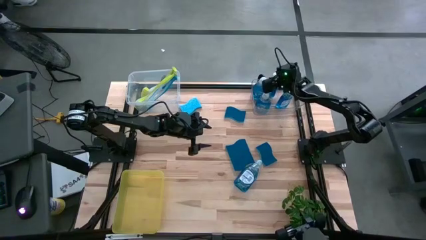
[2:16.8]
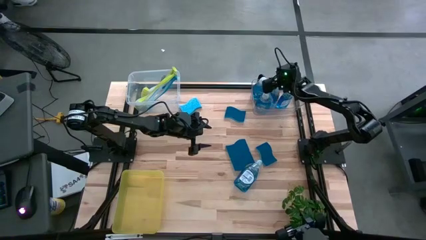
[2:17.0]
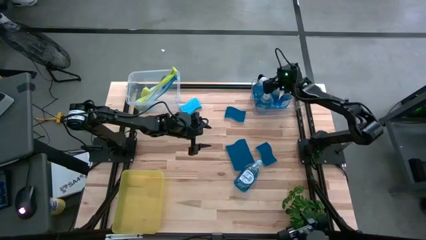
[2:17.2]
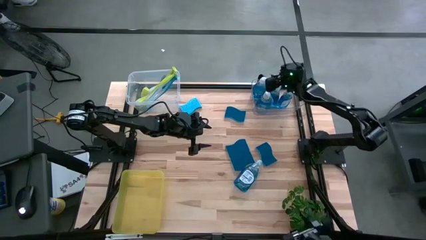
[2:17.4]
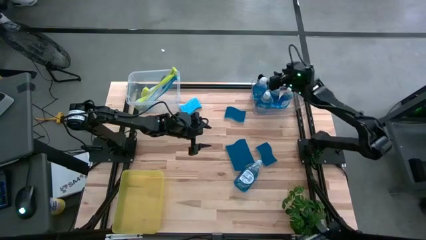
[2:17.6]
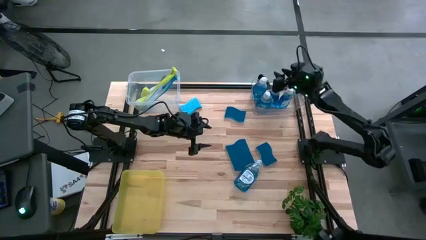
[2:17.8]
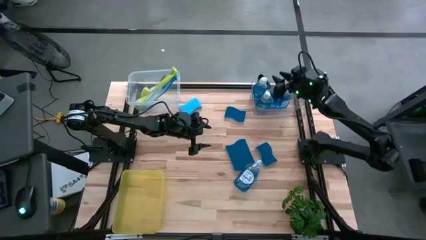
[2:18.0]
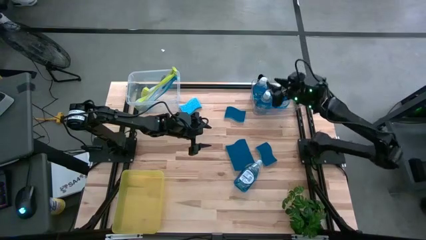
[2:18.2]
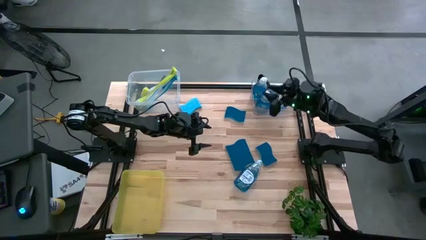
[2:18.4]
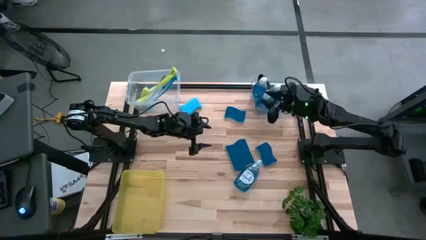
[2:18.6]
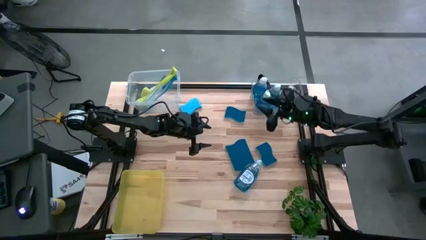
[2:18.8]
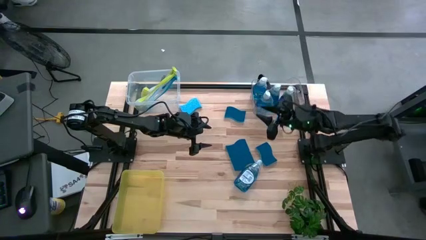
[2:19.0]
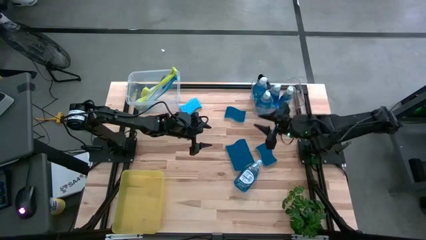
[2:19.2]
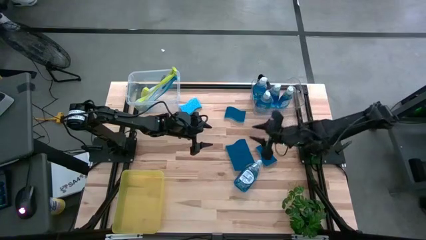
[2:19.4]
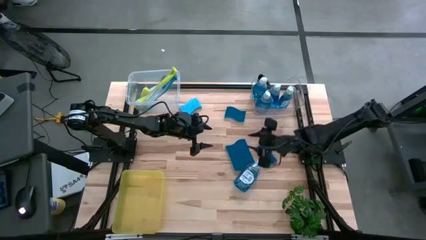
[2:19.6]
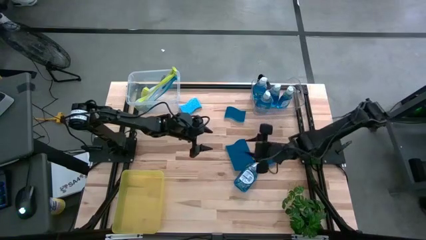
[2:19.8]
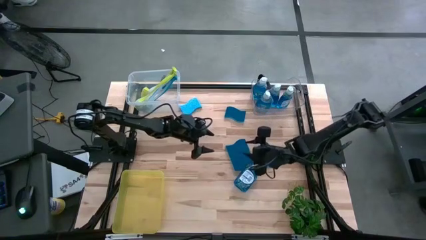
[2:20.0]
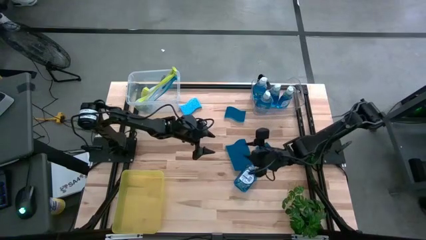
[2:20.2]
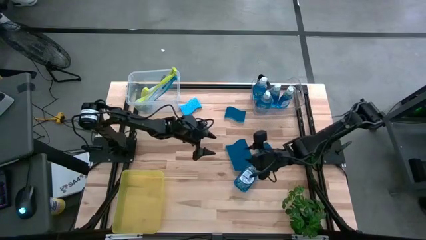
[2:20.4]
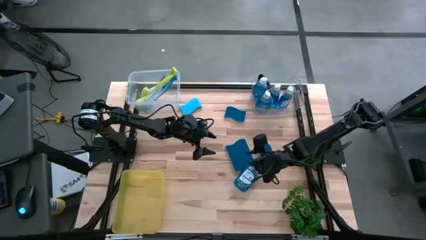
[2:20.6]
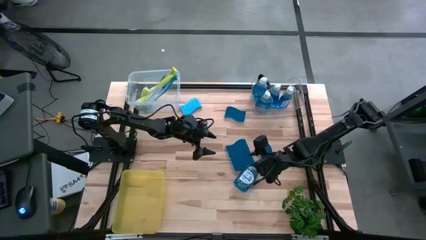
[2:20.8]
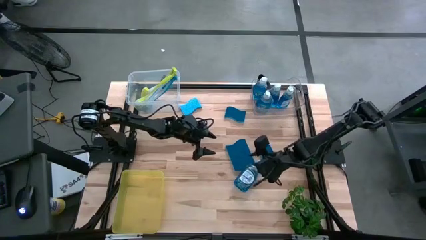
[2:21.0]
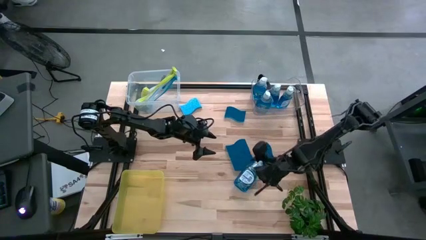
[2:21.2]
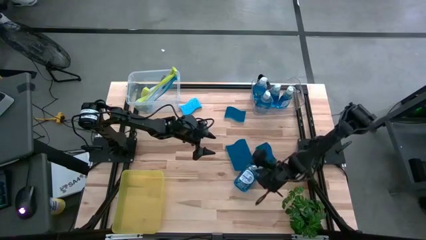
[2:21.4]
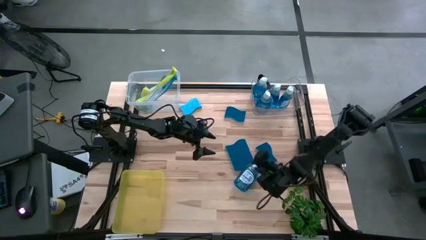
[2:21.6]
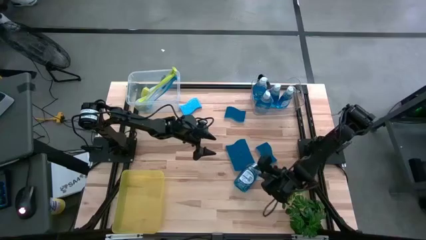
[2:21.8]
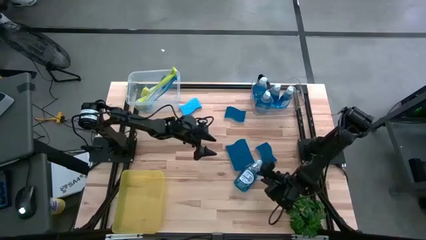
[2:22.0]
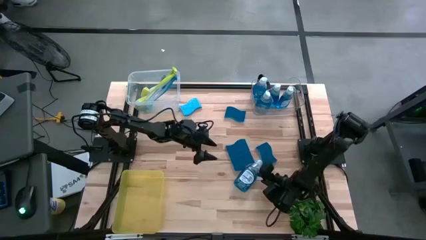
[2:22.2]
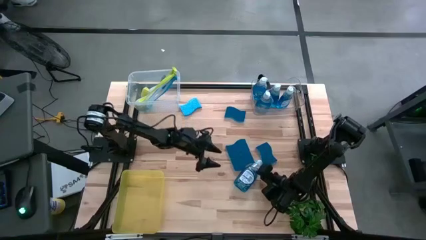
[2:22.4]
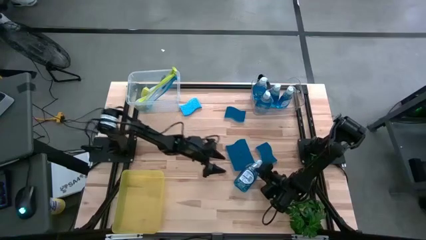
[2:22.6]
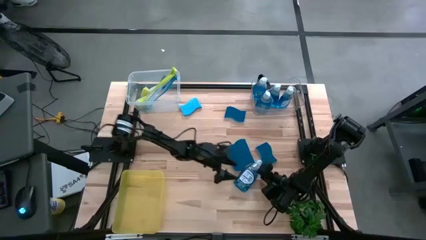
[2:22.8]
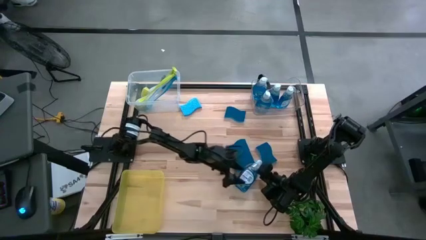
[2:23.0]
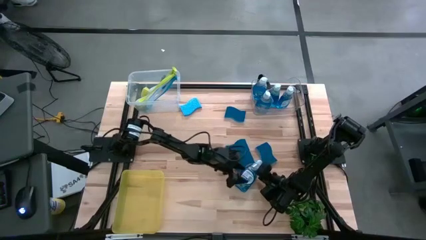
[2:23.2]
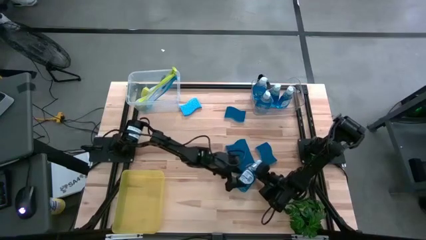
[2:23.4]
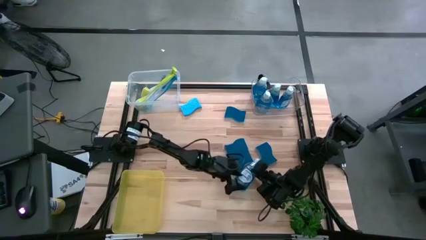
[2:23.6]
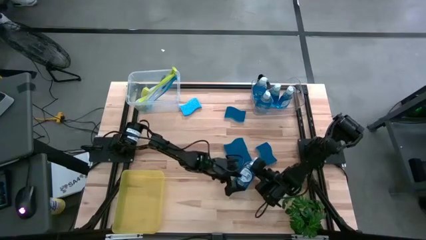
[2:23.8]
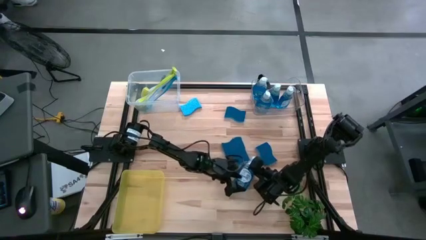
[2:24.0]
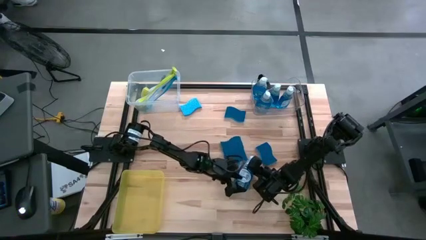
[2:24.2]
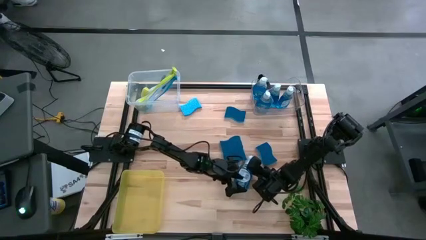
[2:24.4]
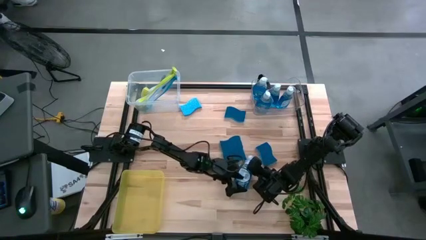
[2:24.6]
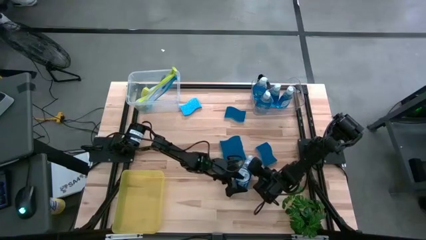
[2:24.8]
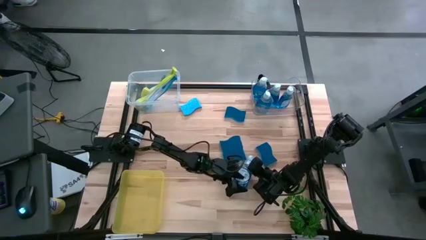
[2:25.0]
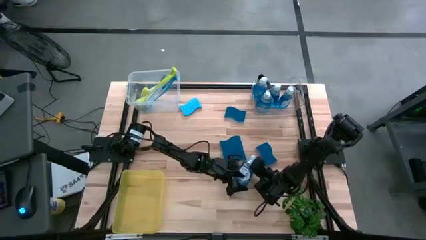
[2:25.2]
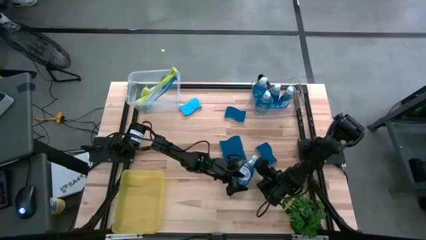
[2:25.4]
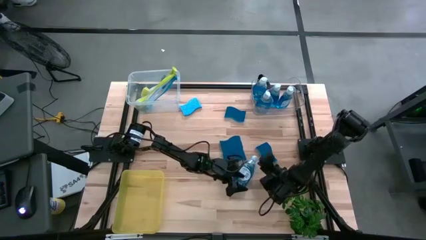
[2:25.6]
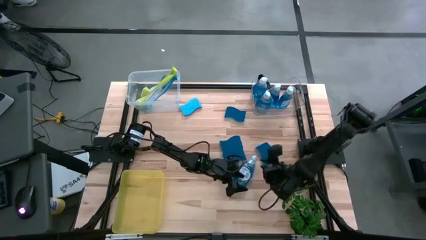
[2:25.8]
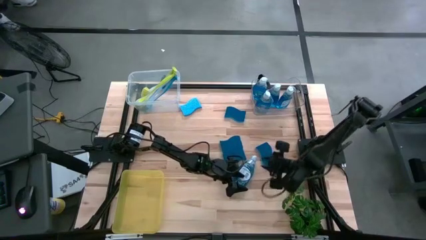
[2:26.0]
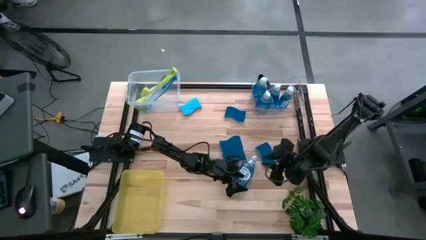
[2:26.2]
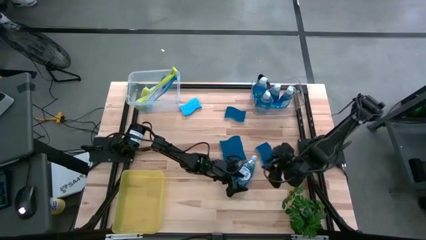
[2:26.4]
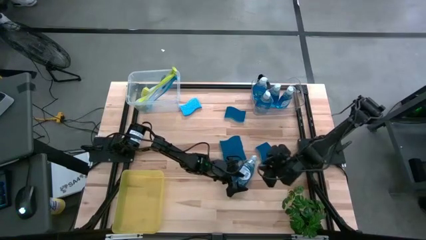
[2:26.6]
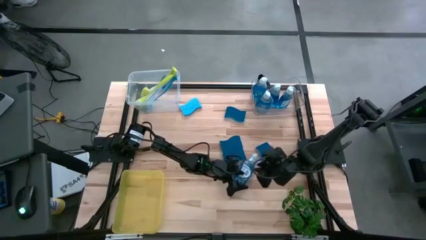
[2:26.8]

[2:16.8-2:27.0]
Task: Pick & Place Kitchen Sink Supplies
Put the soap dispenser into the transparent bin

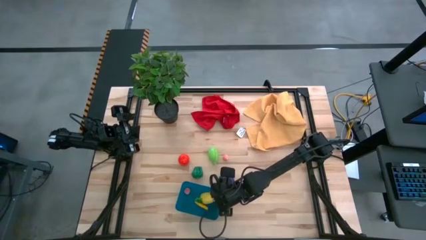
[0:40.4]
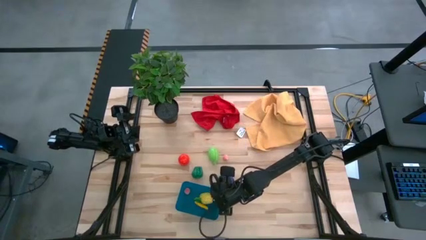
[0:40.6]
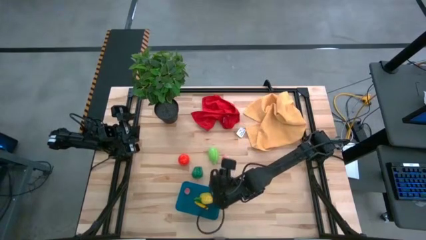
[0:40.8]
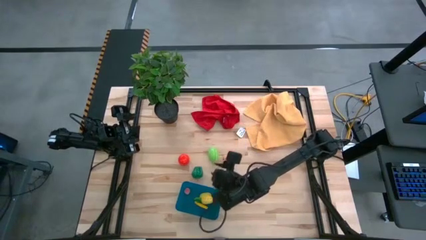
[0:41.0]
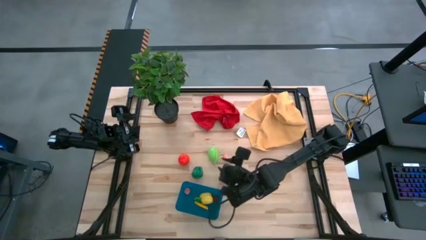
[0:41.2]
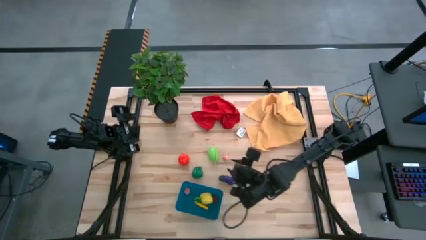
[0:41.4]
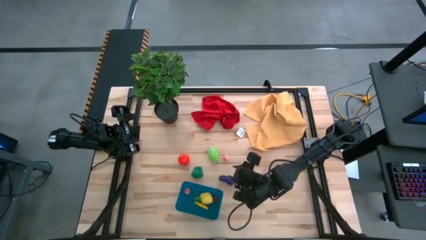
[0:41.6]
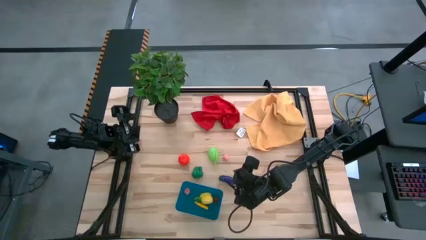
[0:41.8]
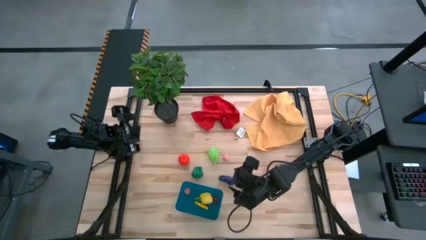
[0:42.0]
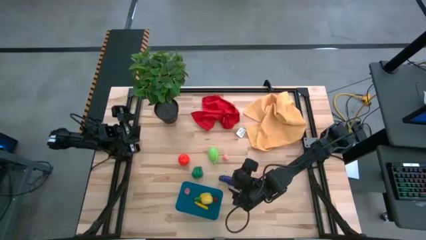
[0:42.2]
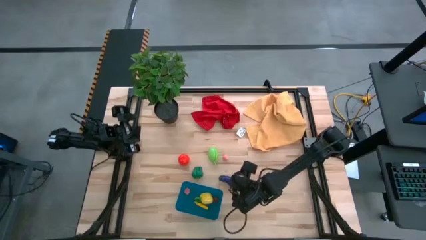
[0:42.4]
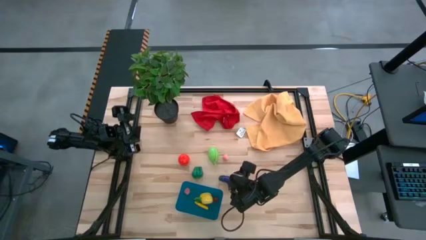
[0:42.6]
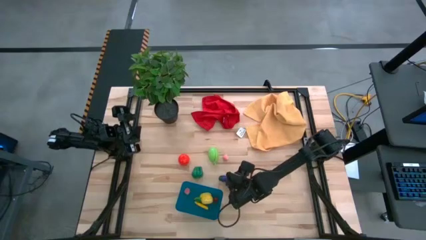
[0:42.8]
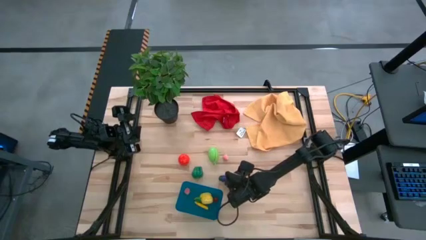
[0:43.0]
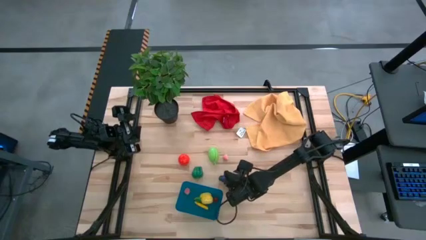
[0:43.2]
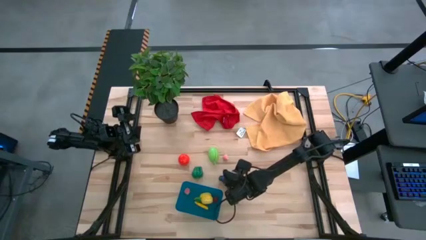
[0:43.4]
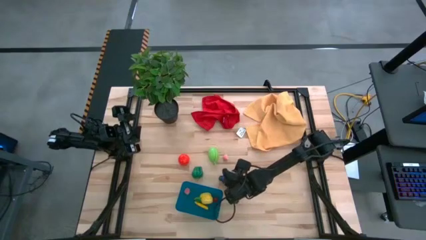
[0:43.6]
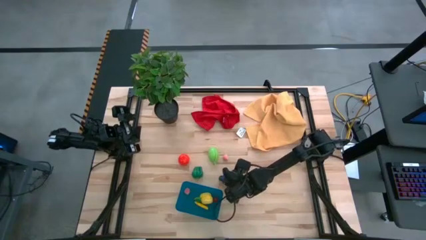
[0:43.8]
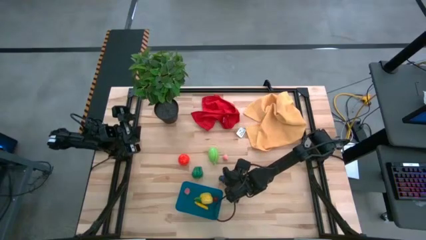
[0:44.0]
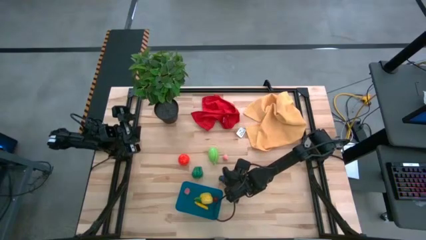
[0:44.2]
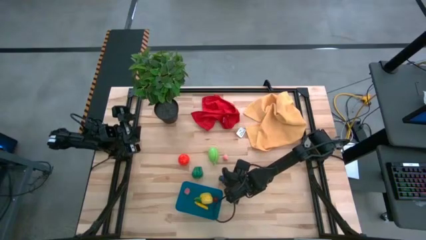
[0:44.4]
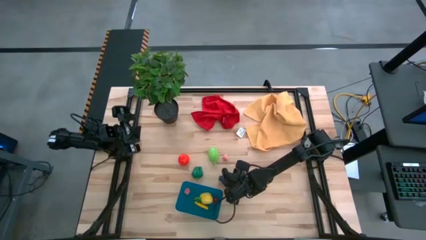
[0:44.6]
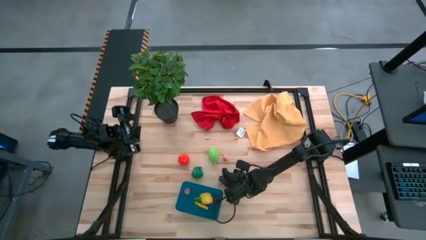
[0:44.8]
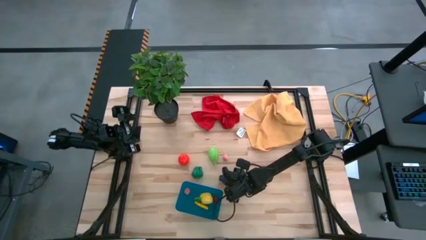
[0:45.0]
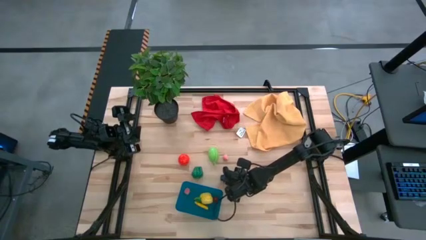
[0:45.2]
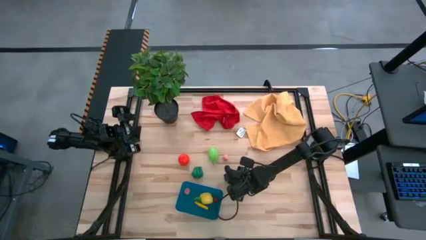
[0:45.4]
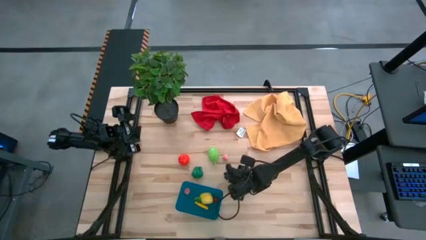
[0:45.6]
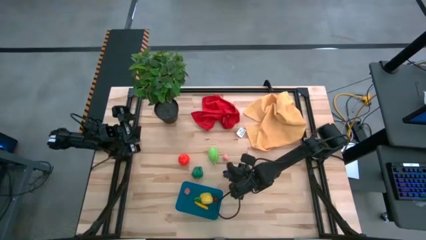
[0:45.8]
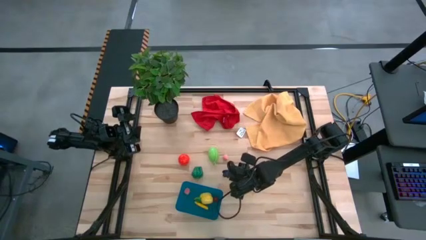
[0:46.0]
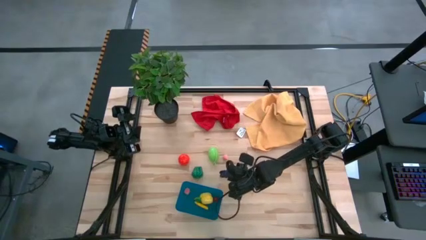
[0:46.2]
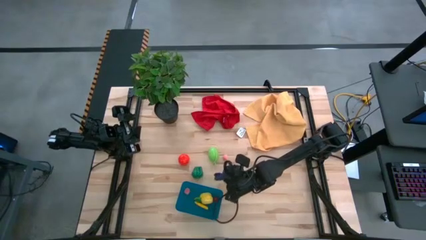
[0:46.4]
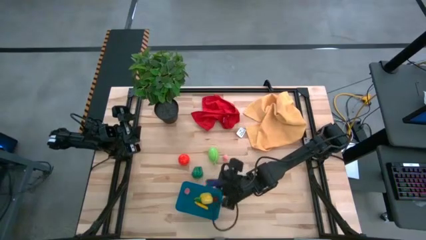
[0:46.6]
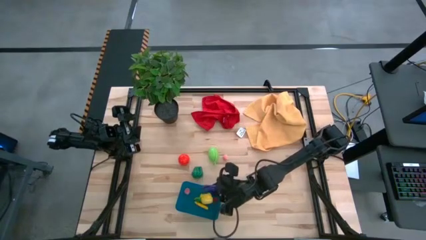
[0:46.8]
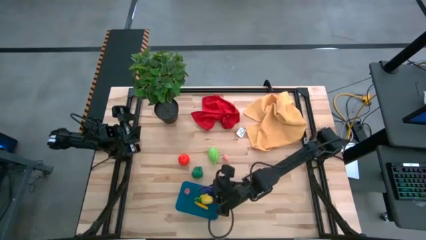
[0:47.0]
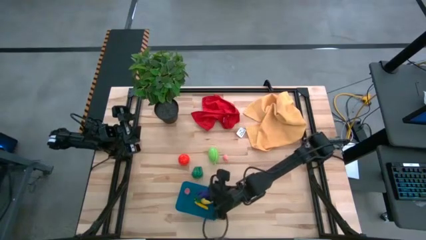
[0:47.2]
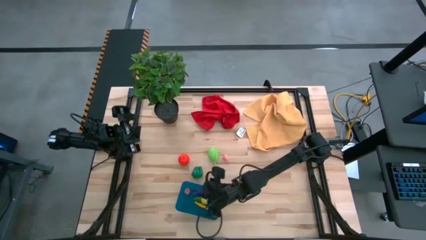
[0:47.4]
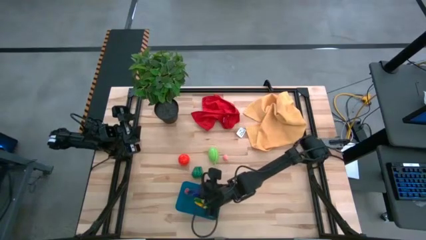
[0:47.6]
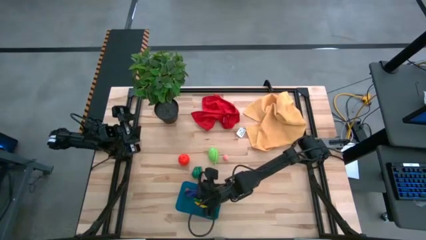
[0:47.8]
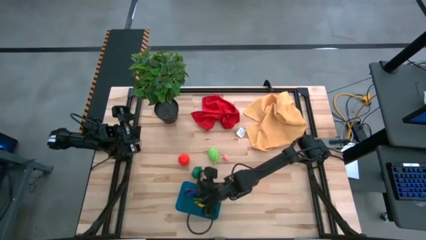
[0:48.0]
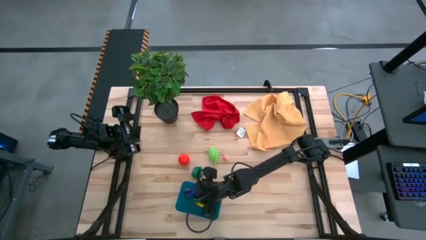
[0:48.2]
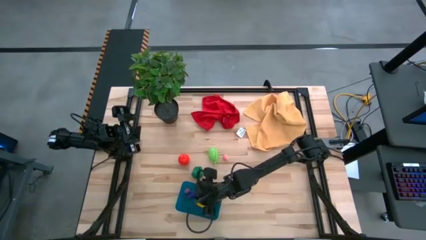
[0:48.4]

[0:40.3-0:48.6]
Task: Pick and placing Produce into tupperware
Put the eggplant into the blue basket
